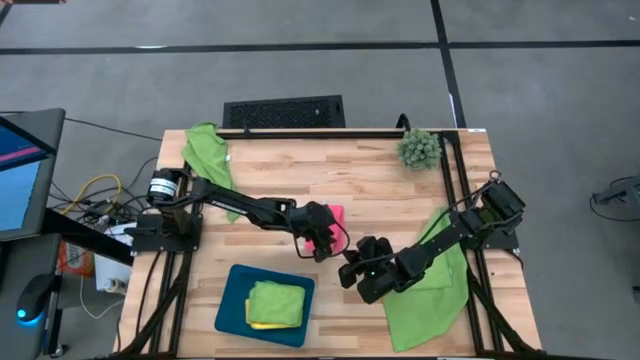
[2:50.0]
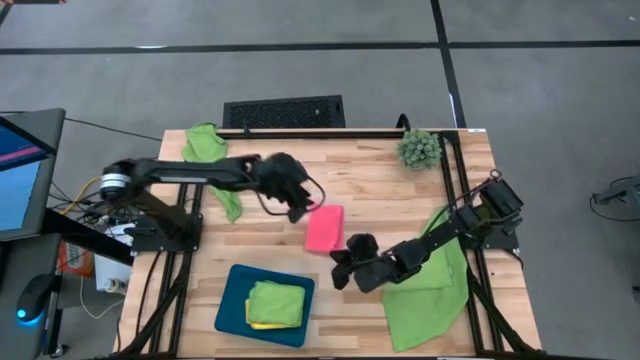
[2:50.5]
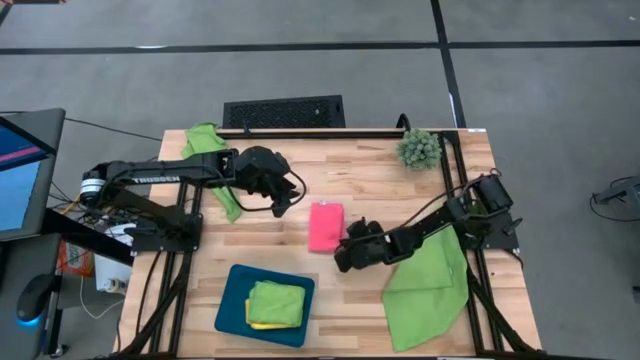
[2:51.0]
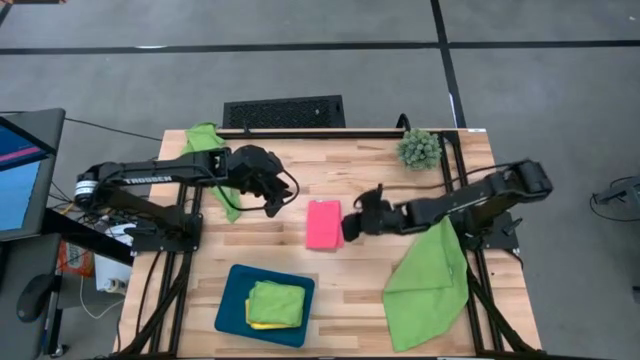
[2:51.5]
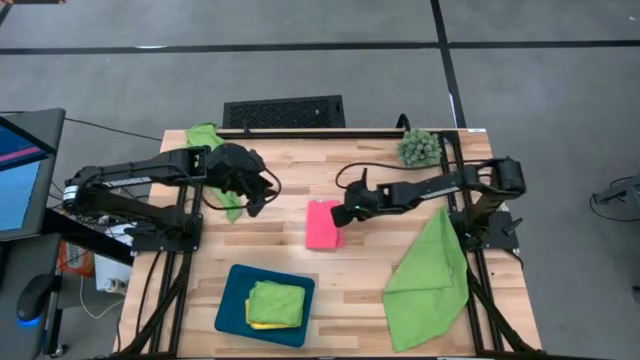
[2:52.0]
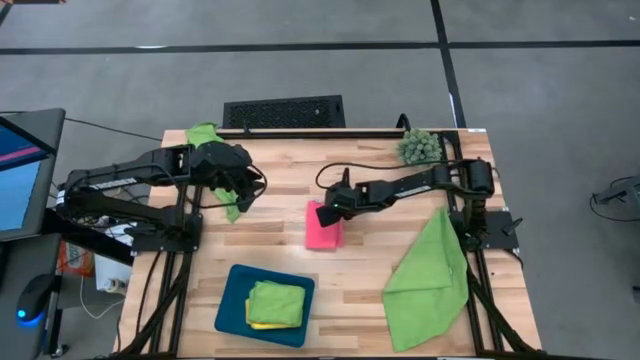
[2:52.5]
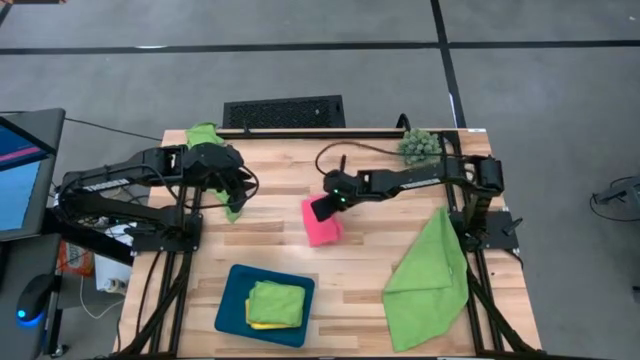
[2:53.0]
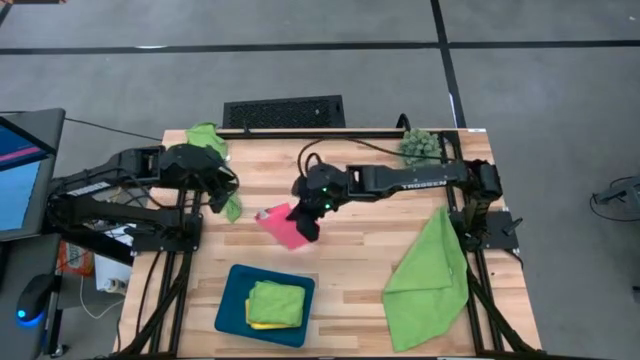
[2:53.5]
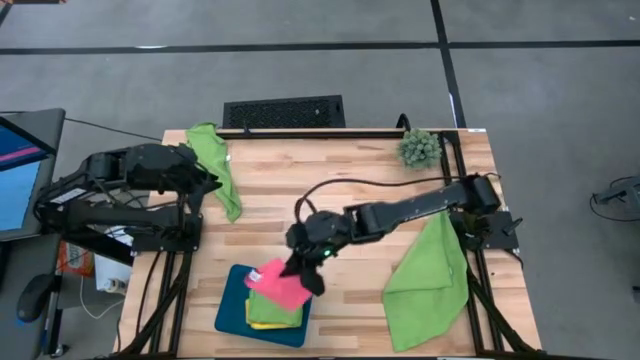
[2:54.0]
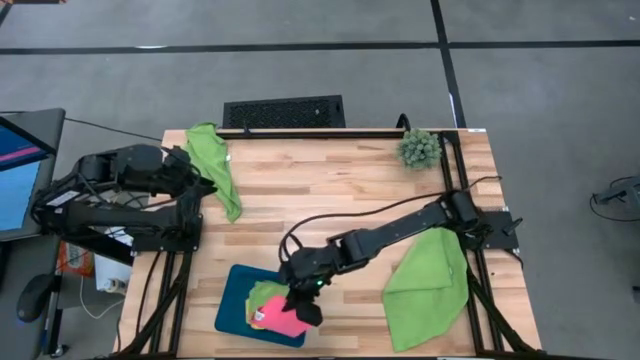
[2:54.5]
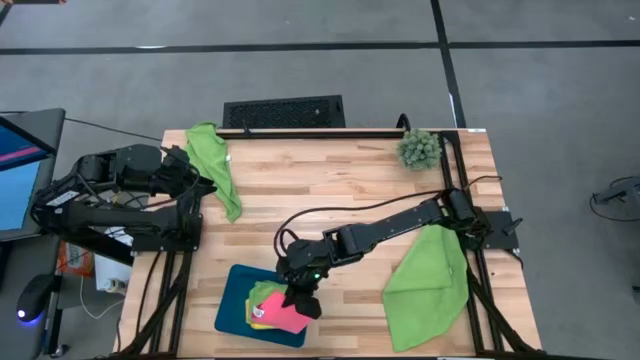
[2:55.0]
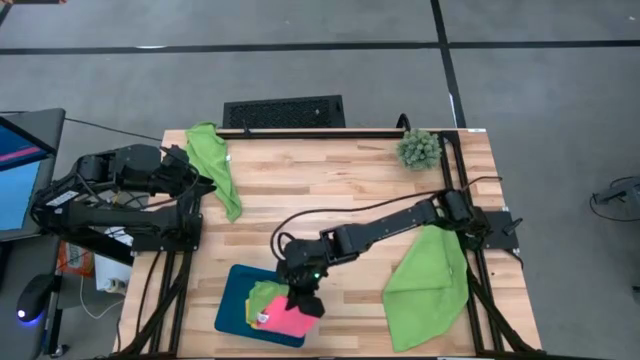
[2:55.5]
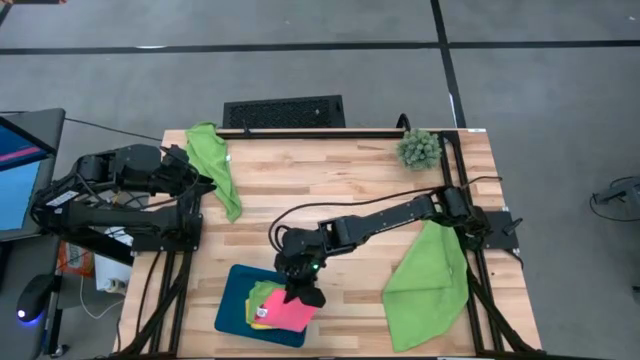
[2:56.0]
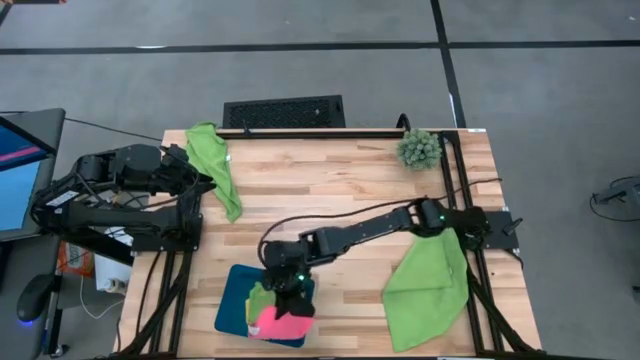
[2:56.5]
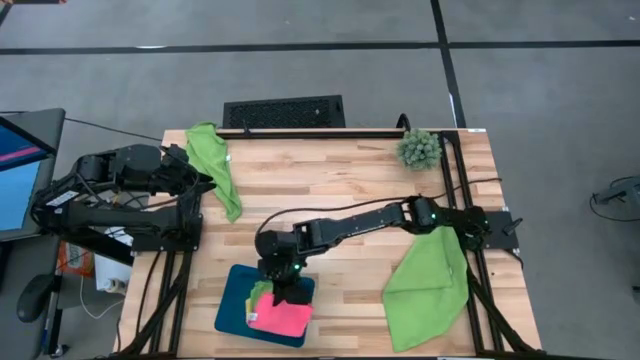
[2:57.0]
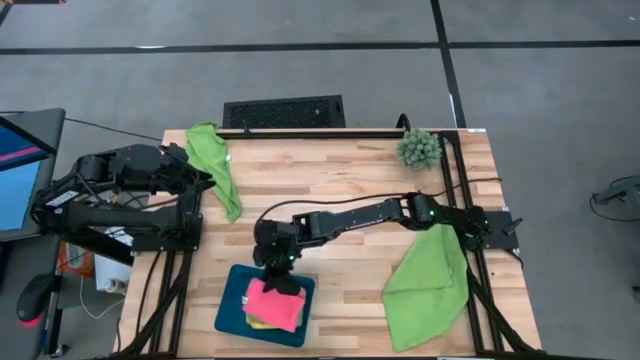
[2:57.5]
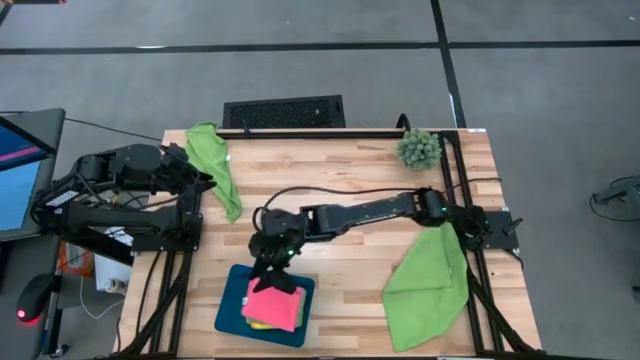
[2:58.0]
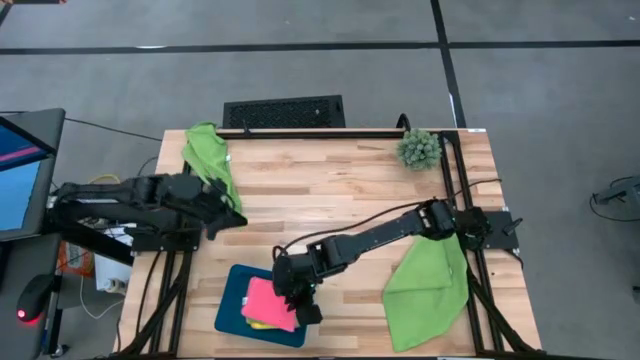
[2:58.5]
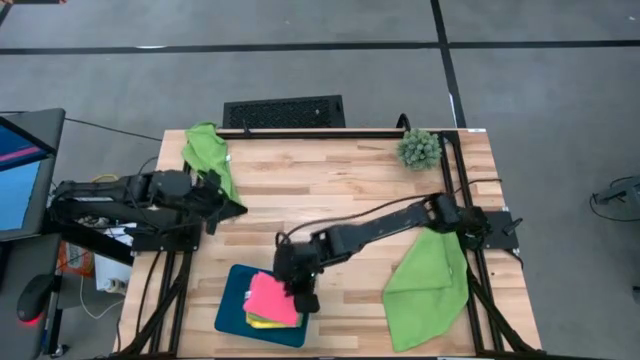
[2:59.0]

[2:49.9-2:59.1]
Task: Fold microfiber towels
Stack the pink microfiber towel on top of the green microfiber towel in the blue bin

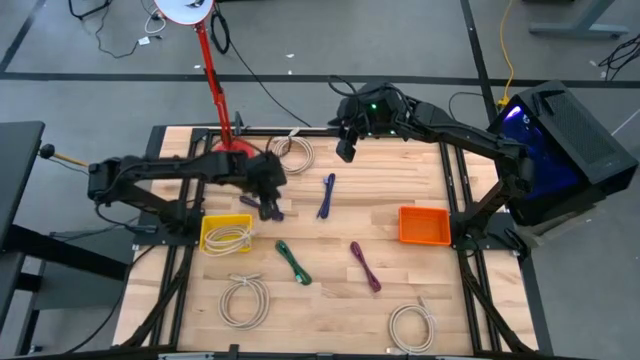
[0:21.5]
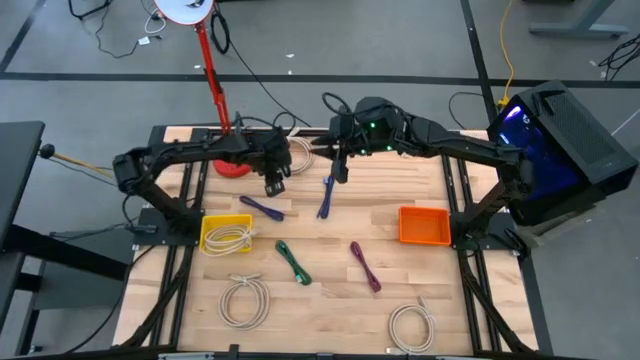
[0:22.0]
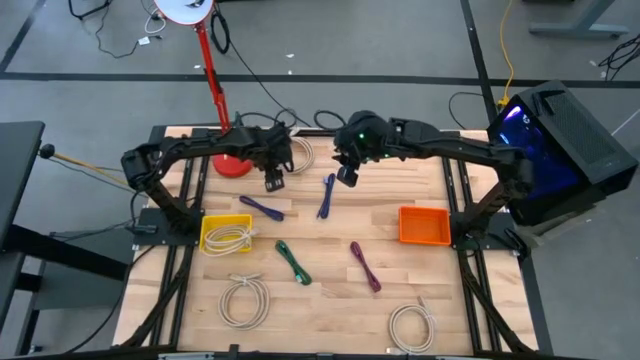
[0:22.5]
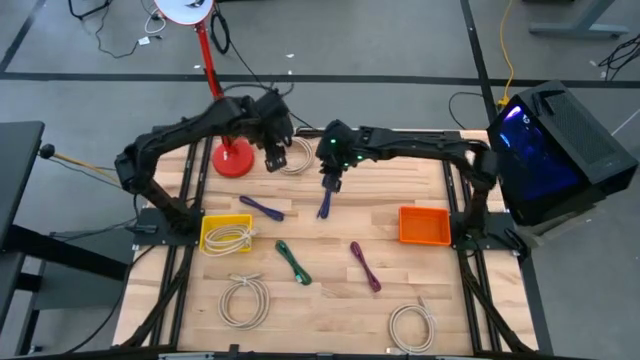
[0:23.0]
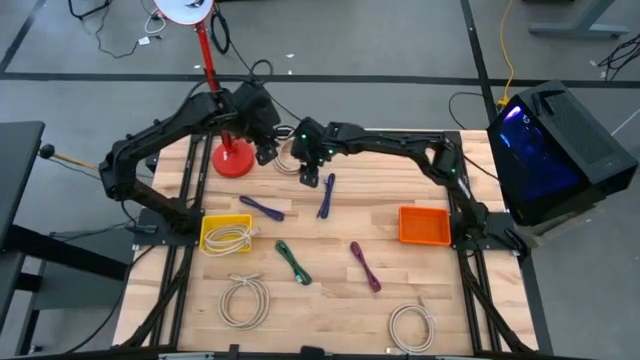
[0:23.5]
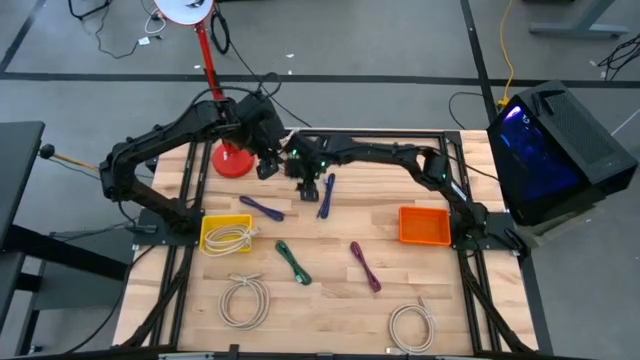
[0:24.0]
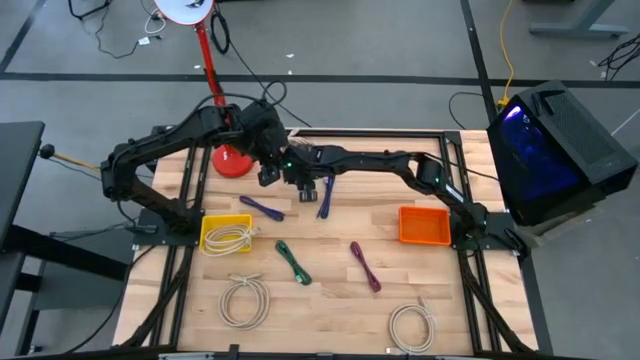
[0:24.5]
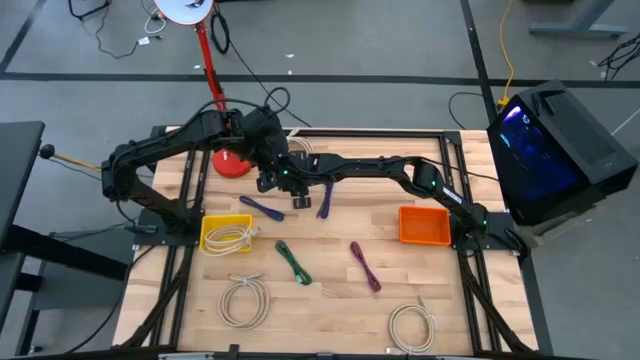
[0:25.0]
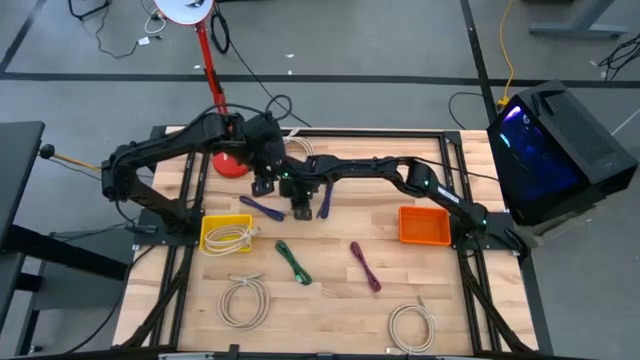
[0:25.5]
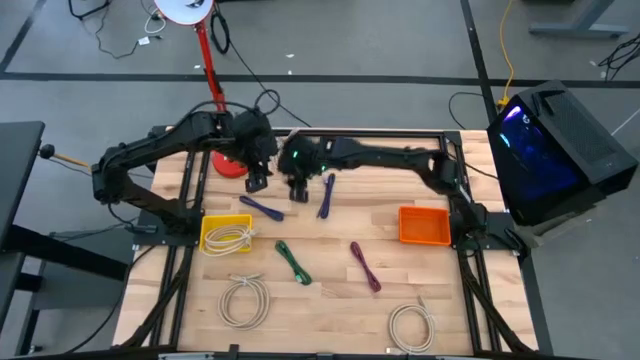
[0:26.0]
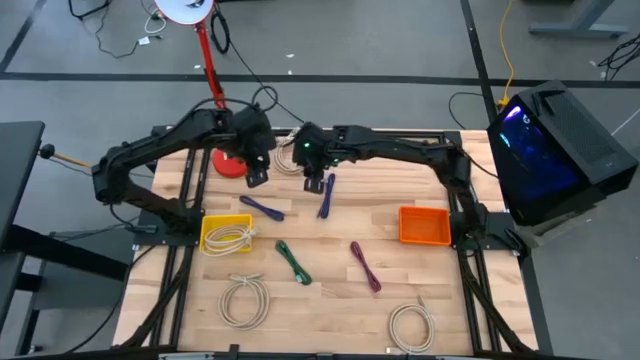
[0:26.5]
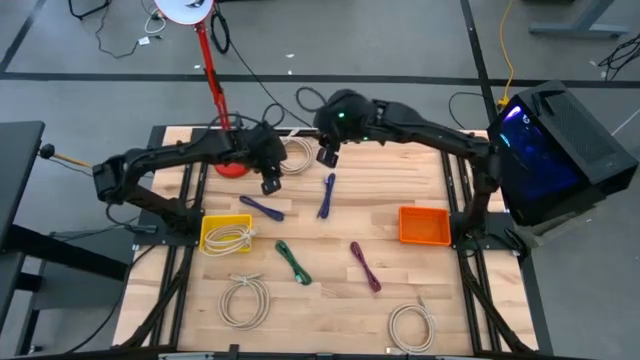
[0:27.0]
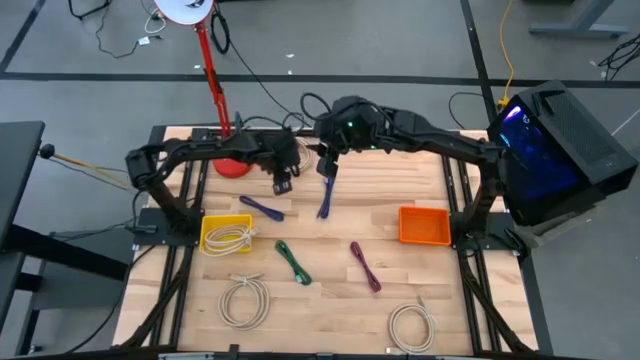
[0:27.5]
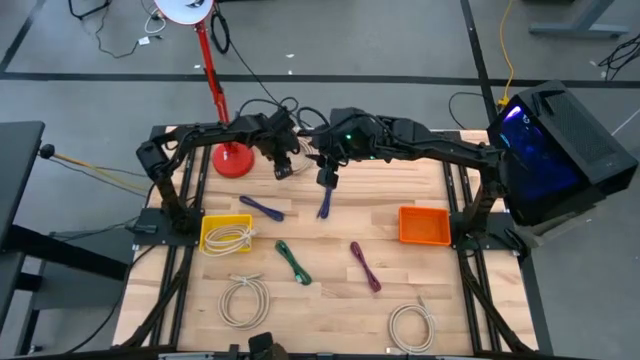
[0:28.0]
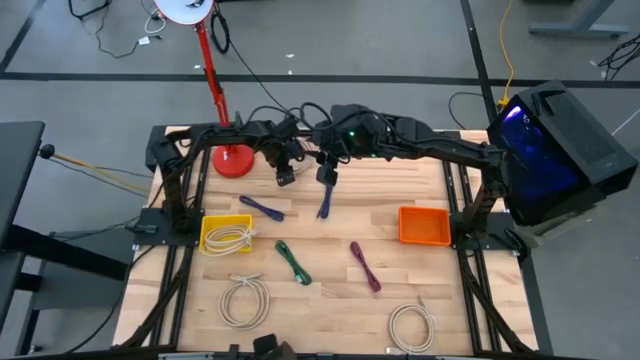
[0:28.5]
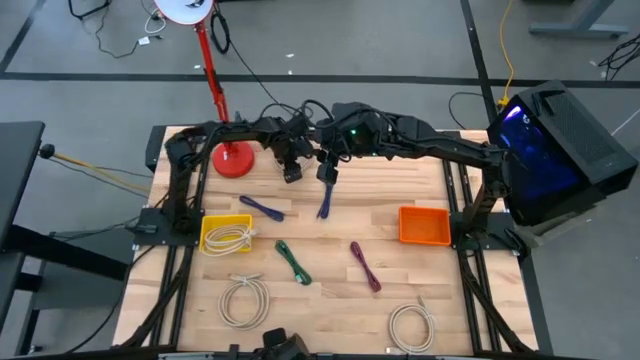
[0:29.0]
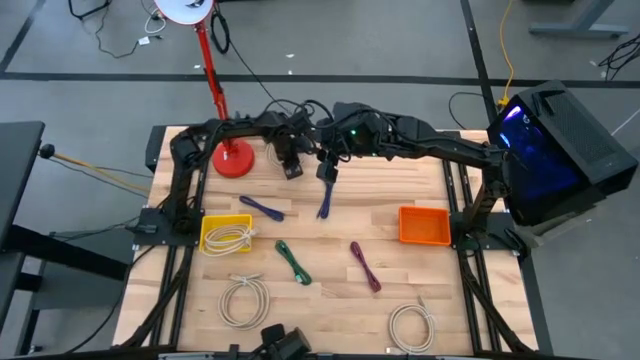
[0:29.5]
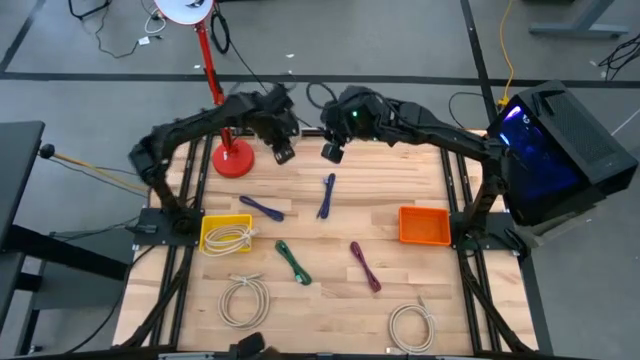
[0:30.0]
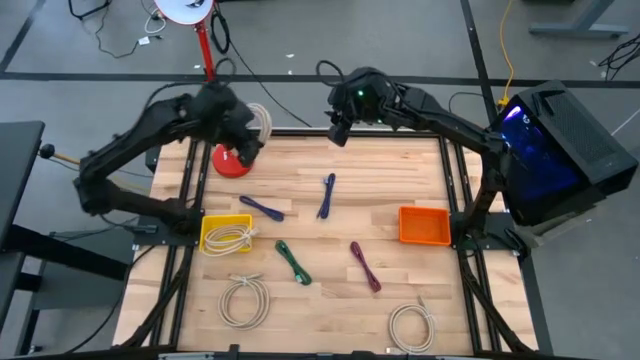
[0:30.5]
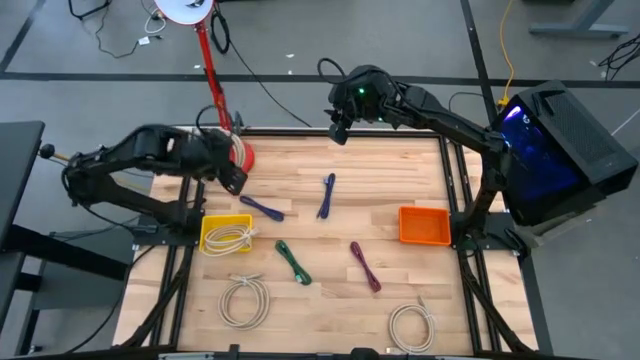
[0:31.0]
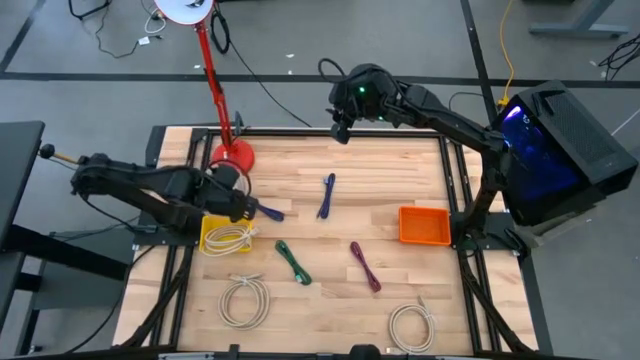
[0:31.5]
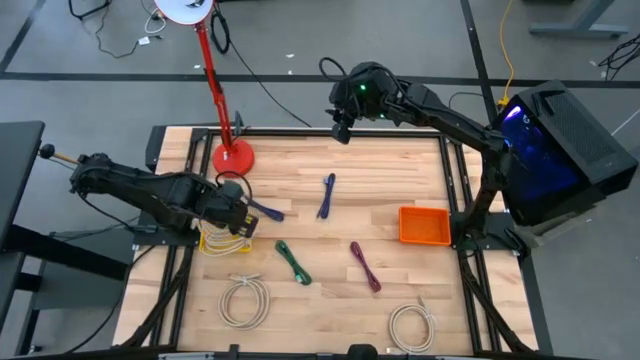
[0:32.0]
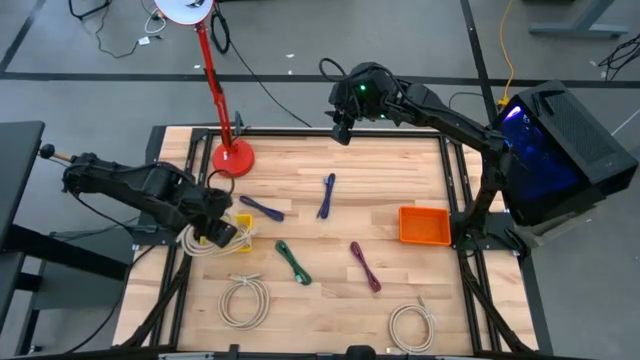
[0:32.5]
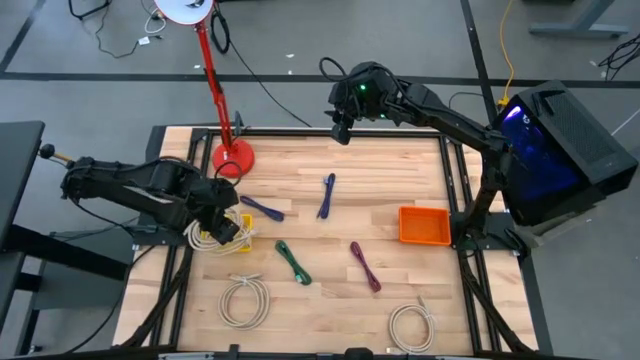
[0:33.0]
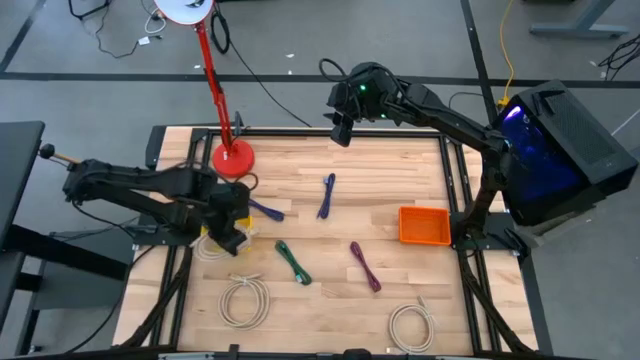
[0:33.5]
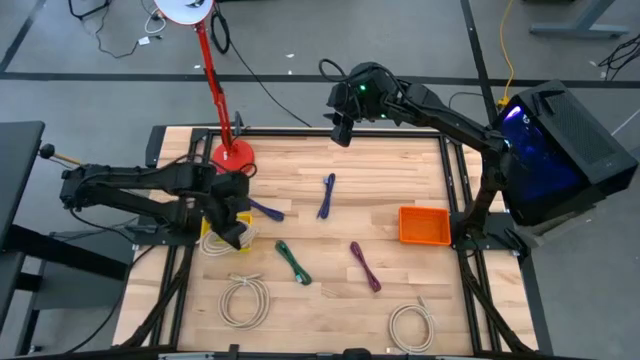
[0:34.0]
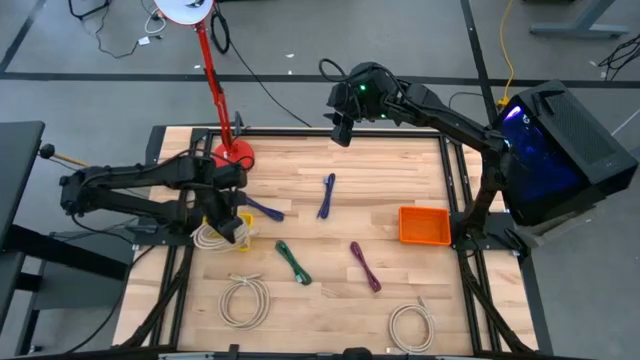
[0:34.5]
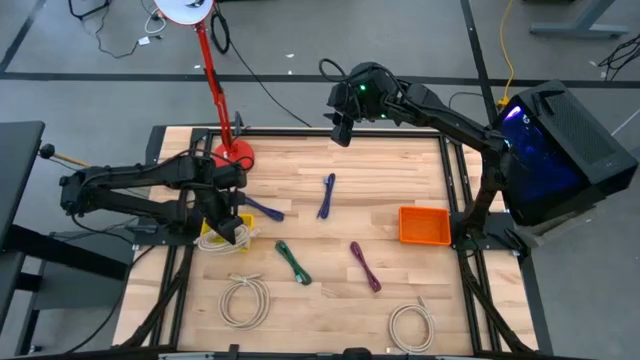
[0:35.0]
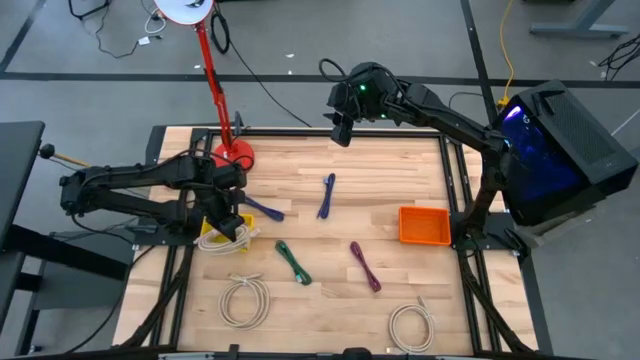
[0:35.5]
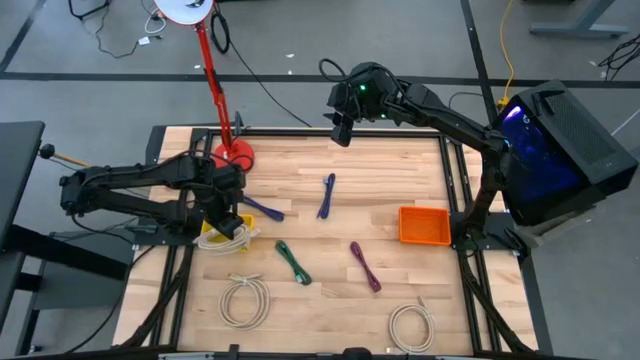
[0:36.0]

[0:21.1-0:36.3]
Task: Pick & Place USB Port
Put the light brown HDMI cable into the yellow bin
